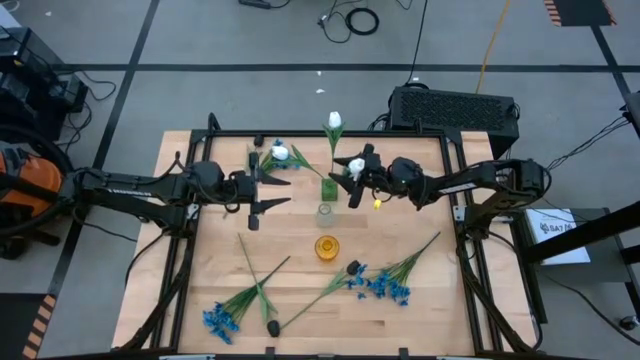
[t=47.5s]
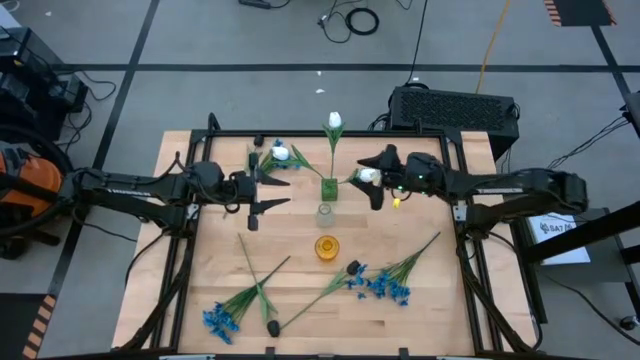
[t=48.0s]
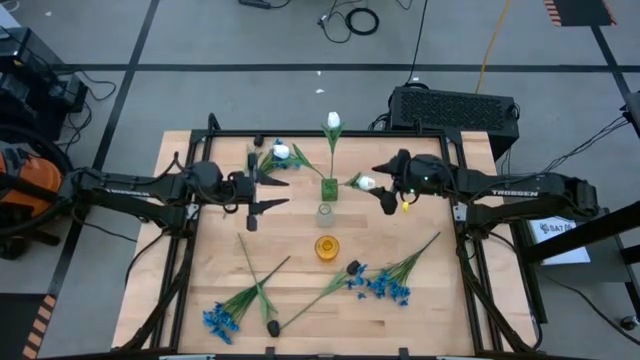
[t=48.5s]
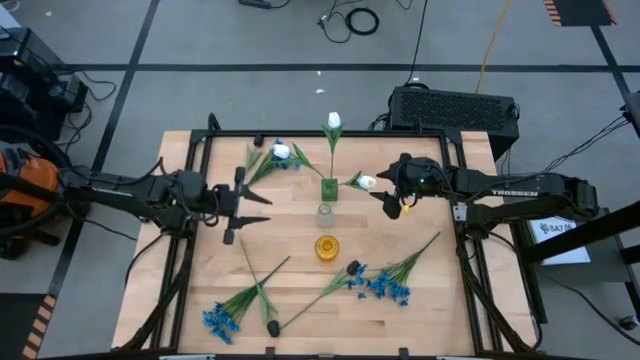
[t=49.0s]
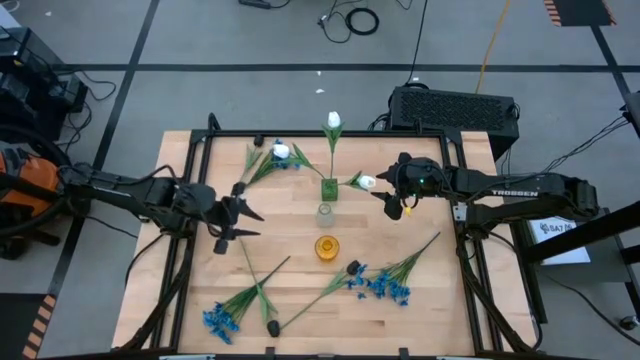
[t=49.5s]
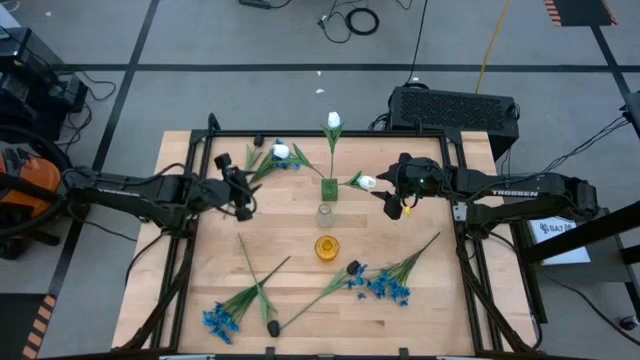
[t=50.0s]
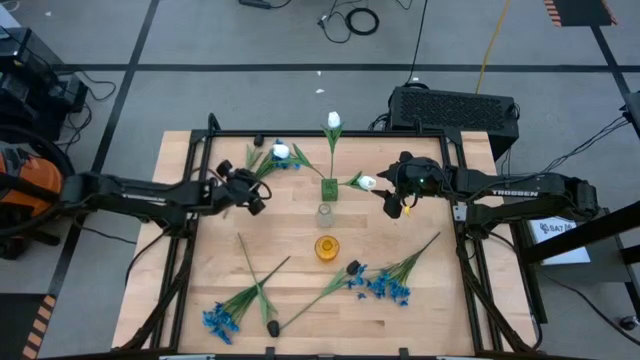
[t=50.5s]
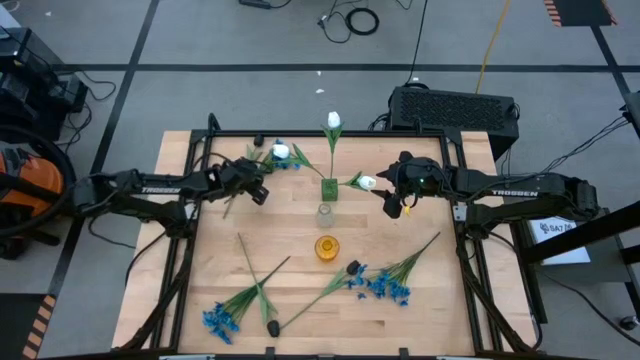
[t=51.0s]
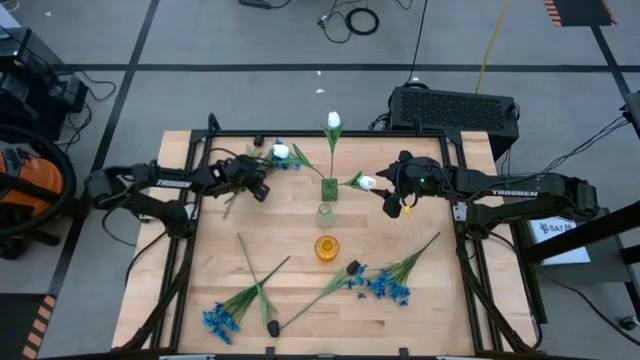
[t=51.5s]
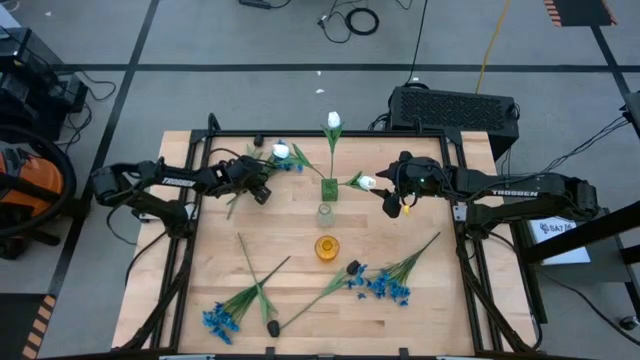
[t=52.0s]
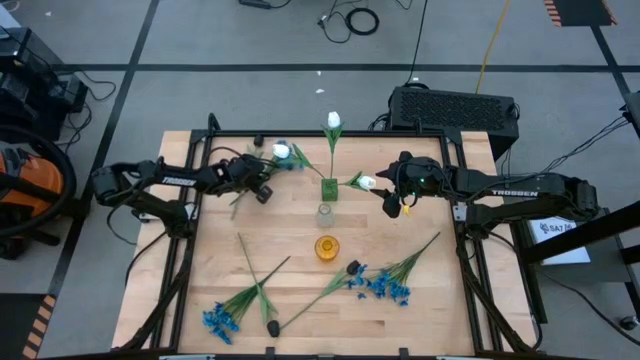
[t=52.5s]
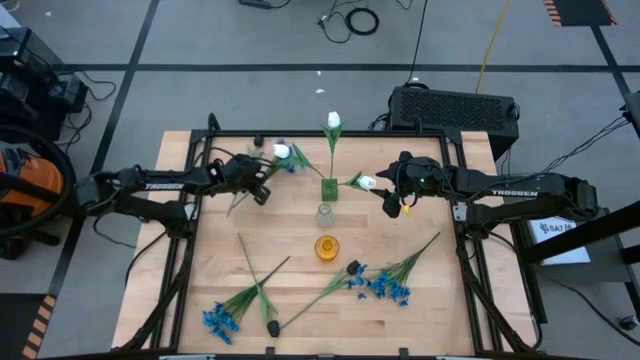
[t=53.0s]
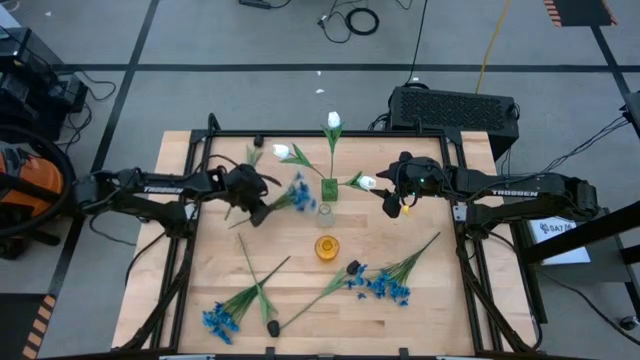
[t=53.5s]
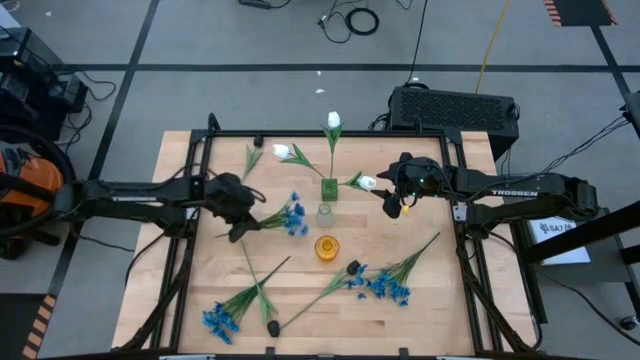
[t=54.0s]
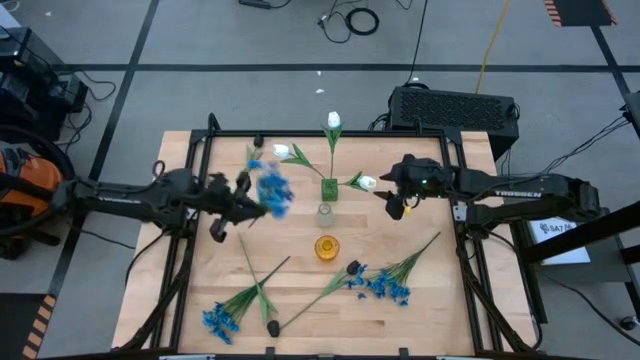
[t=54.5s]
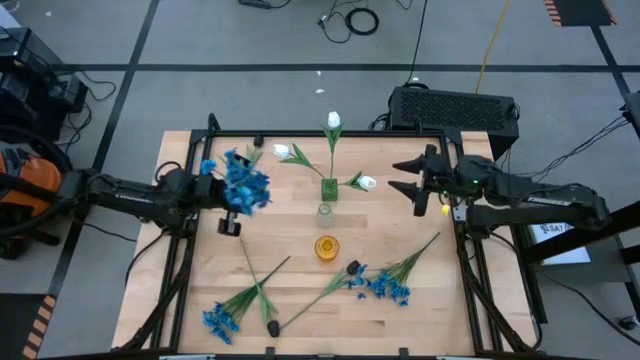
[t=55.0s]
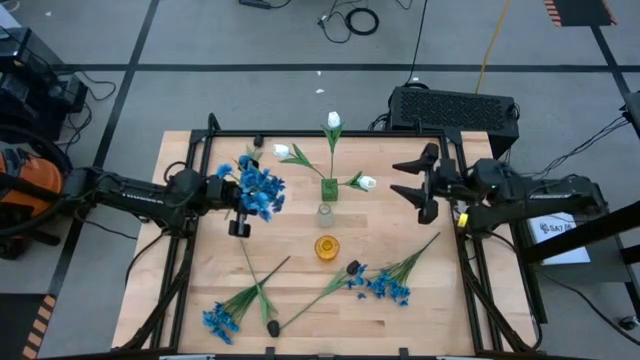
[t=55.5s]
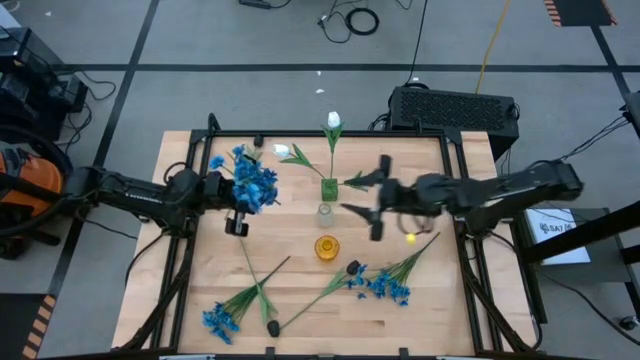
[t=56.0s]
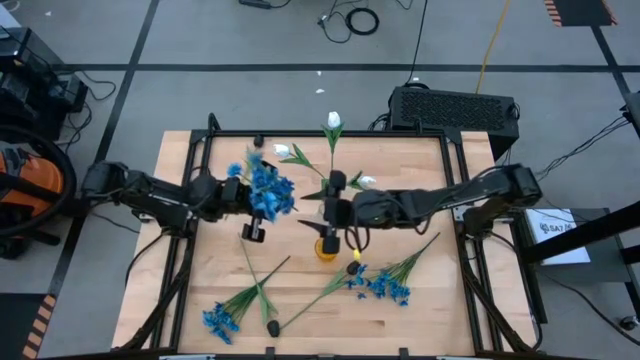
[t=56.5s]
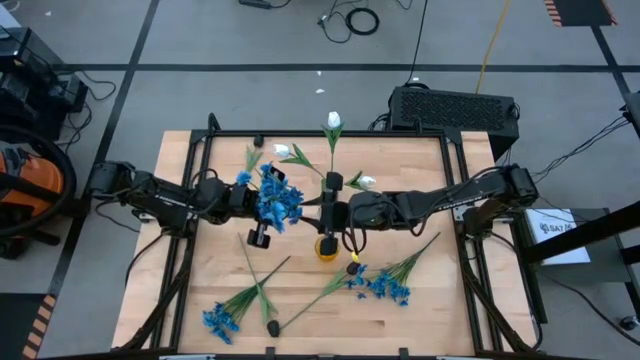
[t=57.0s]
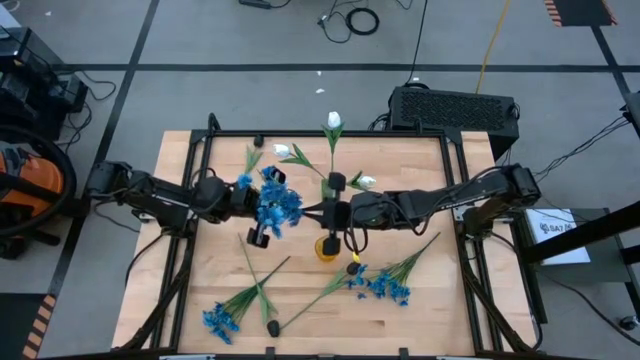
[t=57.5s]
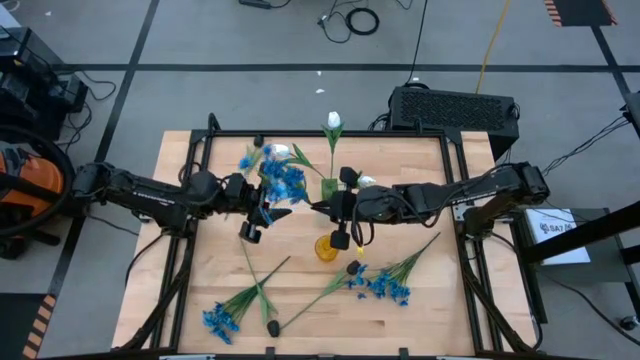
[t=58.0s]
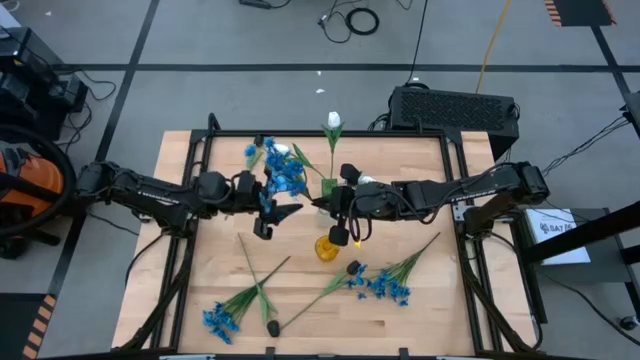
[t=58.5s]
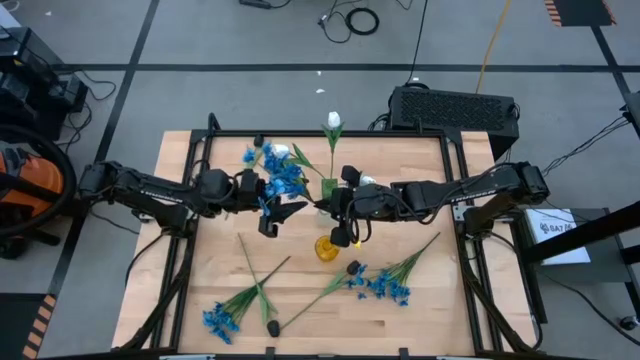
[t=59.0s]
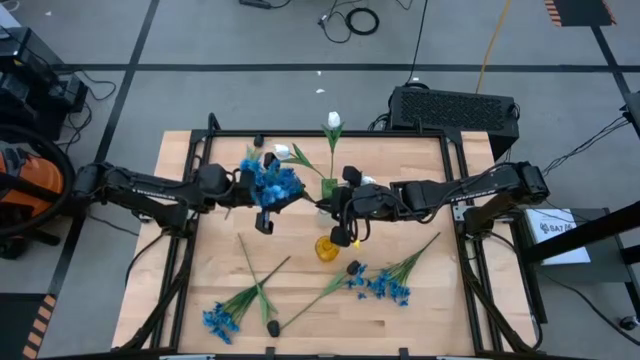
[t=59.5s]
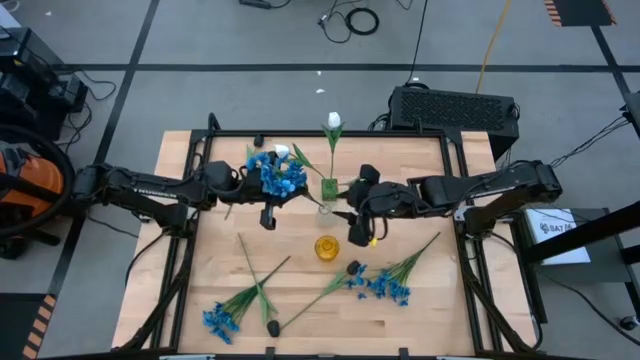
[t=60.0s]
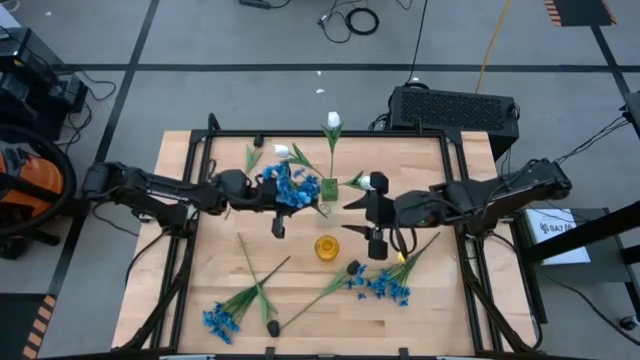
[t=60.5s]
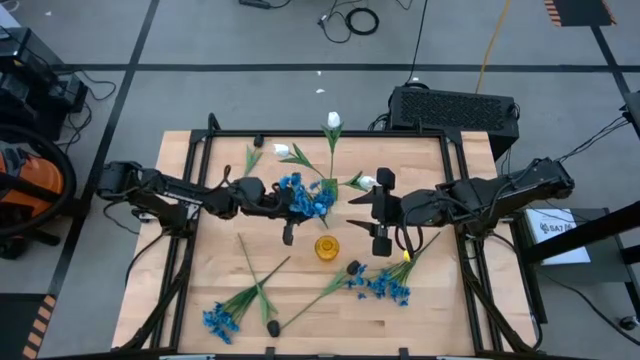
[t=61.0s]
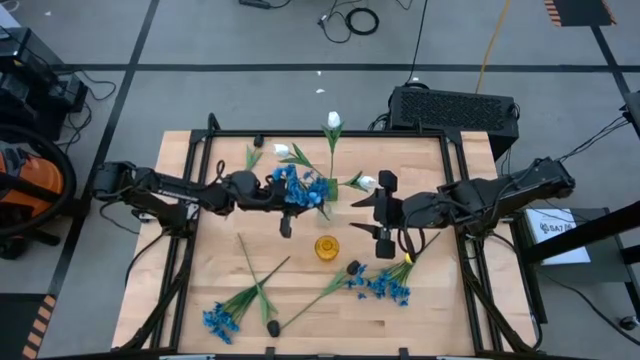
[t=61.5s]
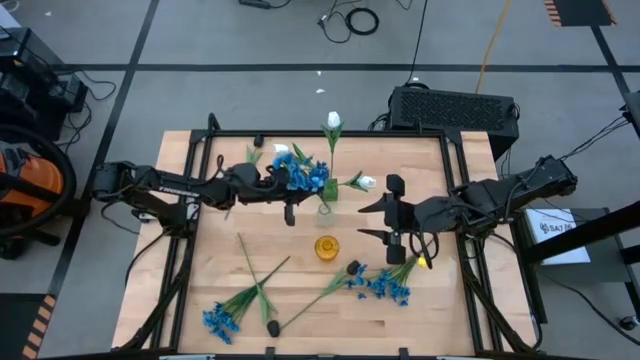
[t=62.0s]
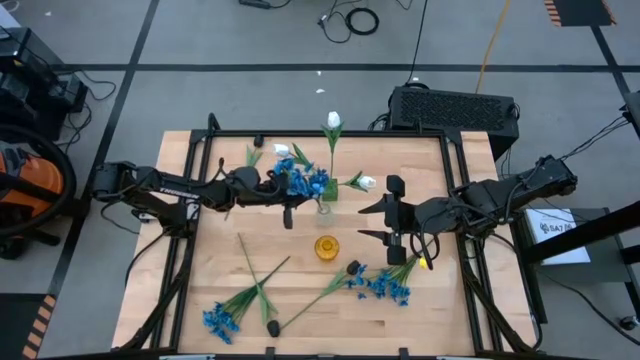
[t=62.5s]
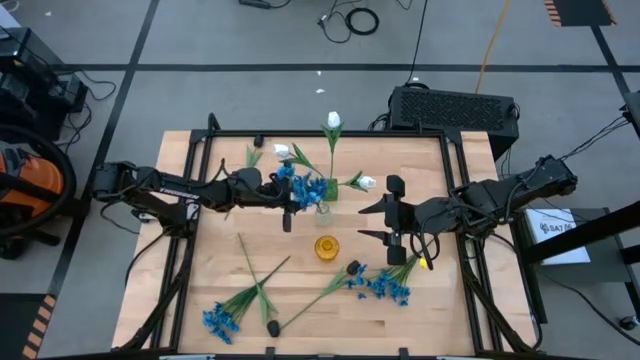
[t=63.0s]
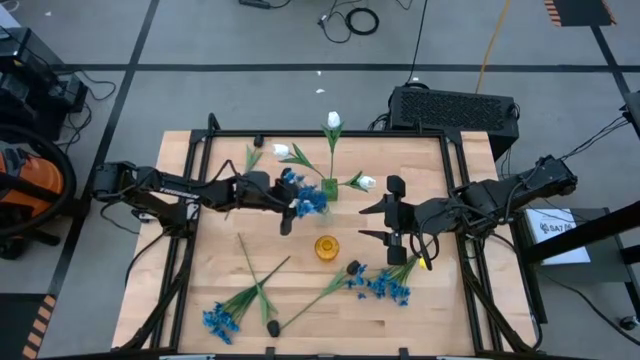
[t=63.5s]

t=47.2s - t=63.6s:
Task: Sort flowers into vase by color
Put the top left blue flowers into the transparent vase

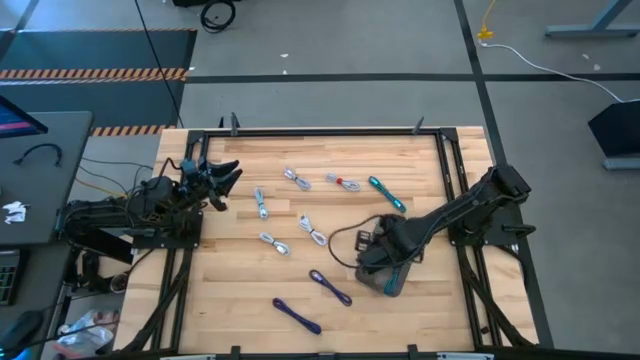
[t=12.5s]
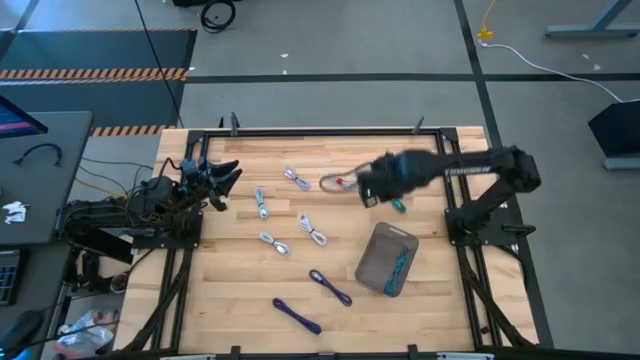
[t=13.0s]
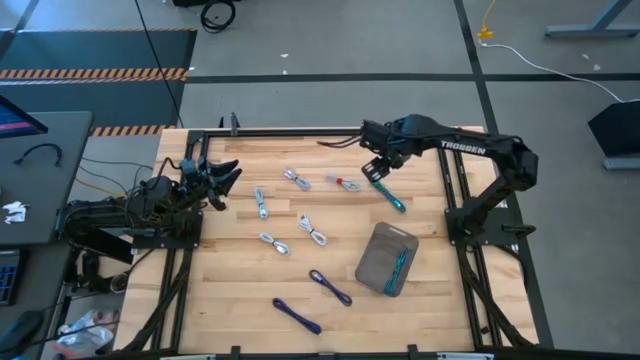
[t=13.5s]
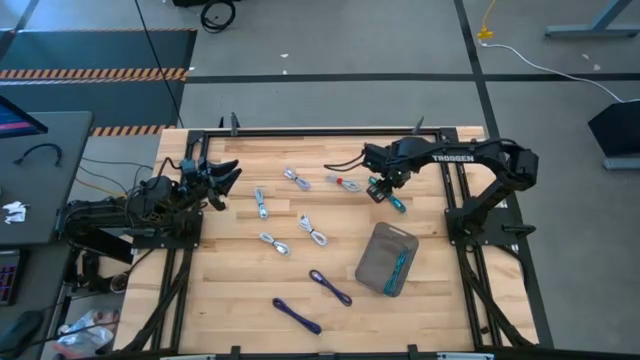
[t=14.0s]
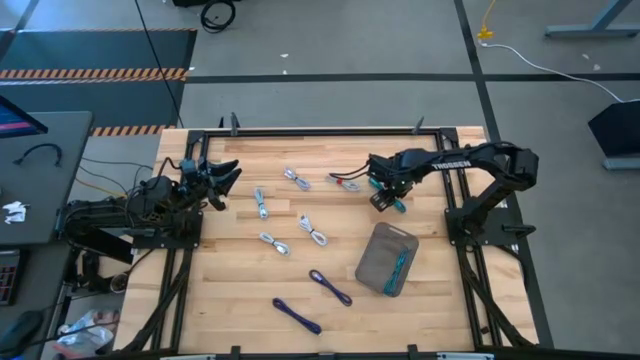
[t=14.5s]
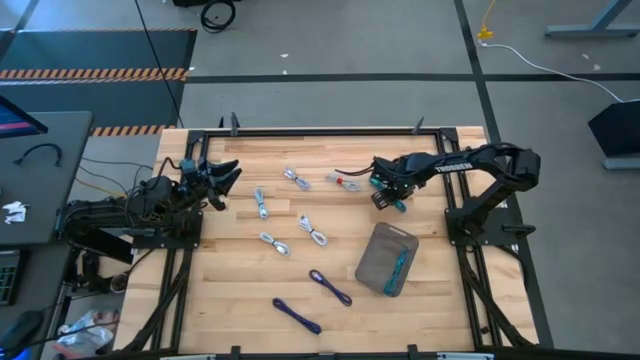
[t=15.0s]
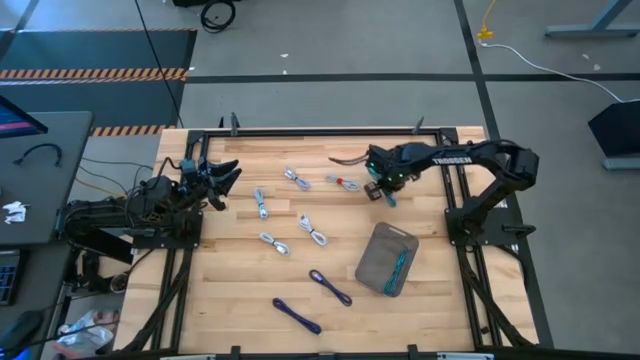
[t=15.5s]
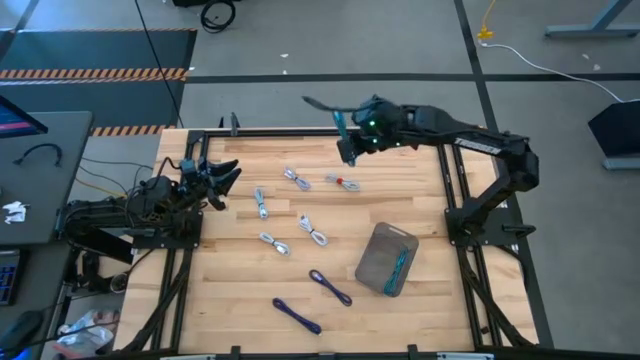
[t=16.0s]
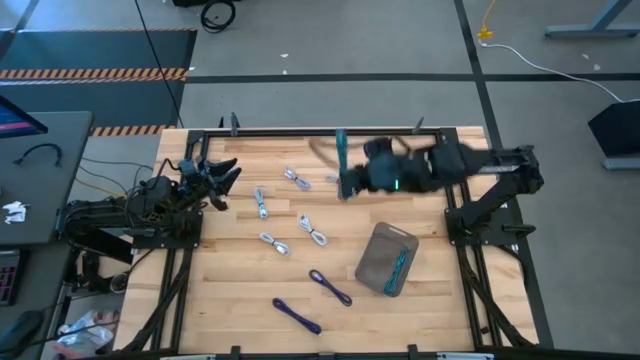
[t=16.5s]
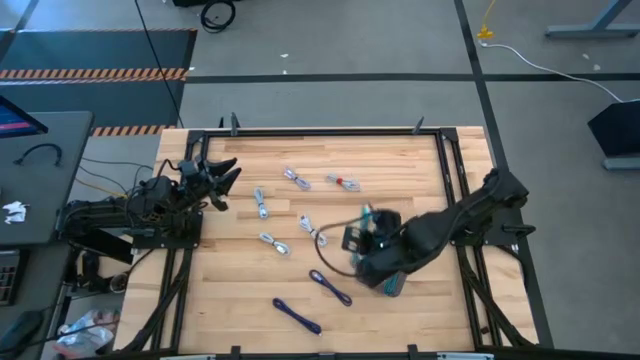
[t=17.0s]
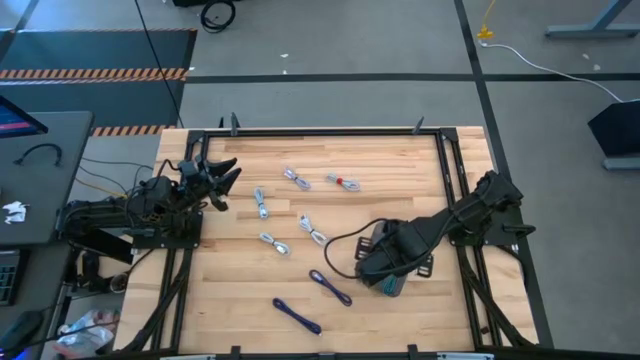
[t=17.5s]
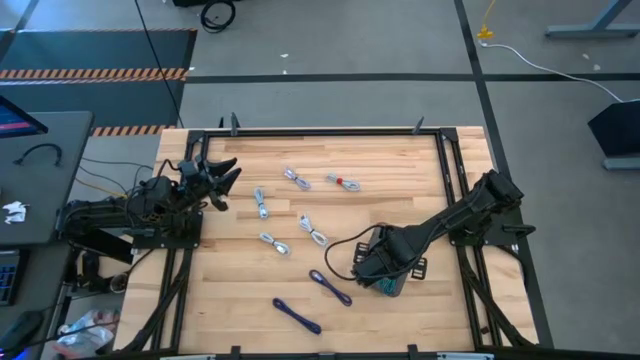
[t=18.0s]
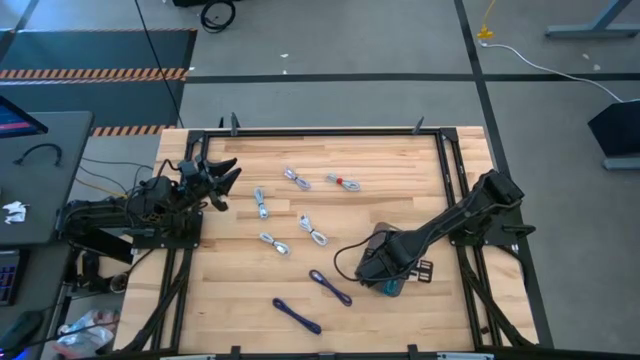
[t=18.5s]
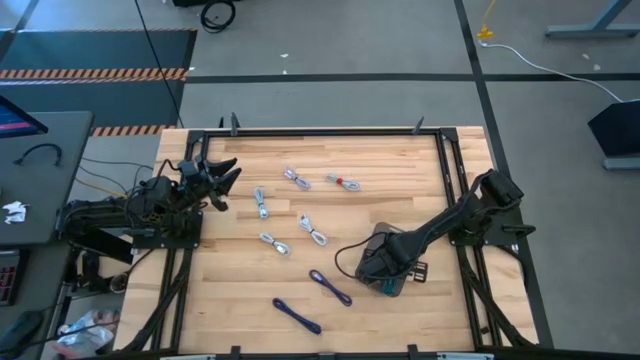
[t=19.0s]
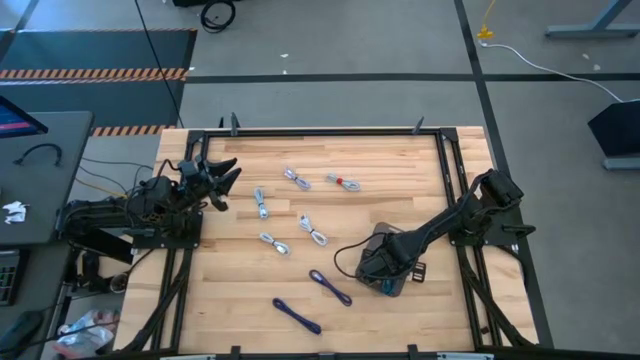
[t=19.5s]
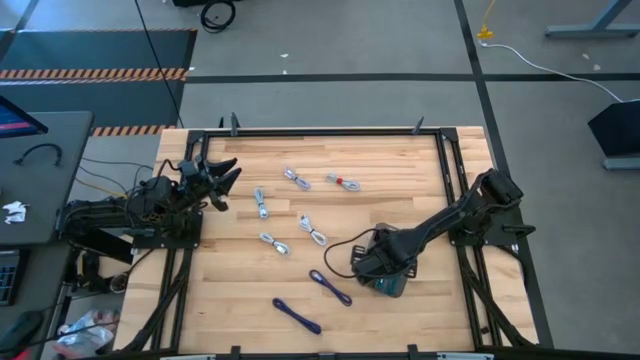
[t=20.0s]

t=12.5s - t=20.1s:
Task: Pick and place USB-C Cables
Put the blue charger cable into the gray bin
